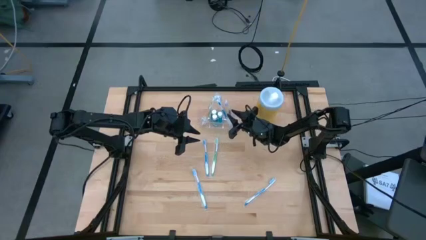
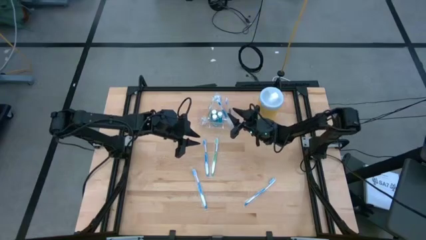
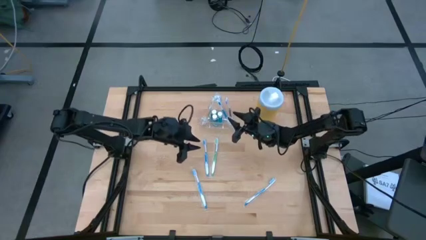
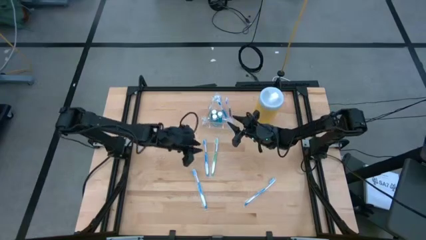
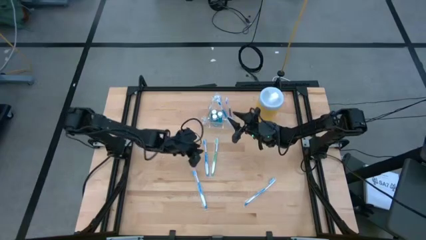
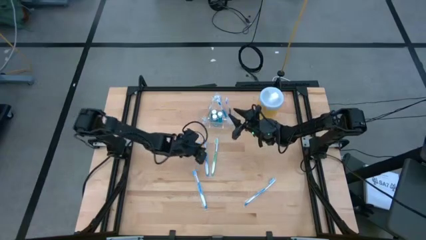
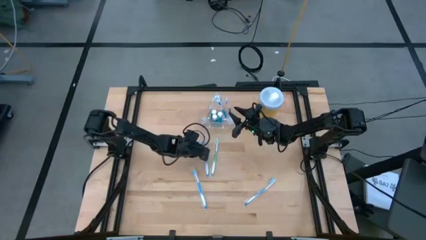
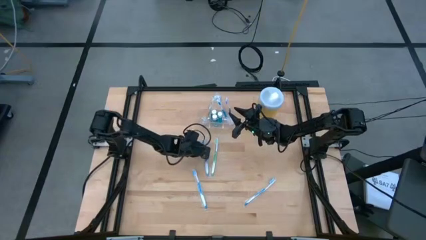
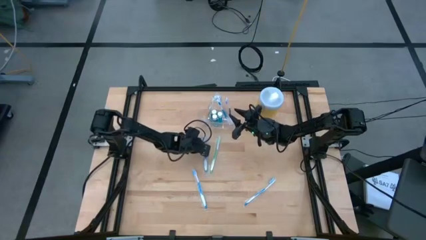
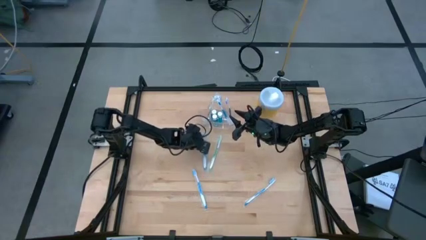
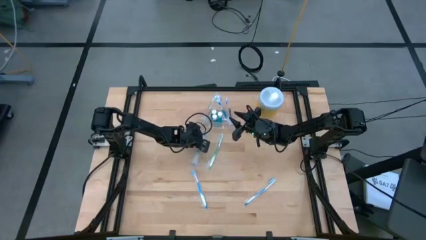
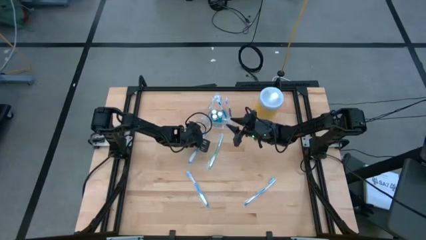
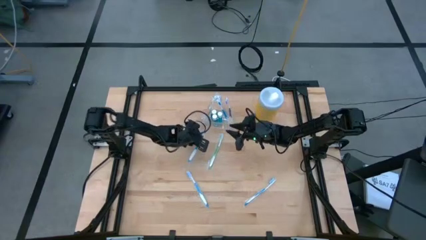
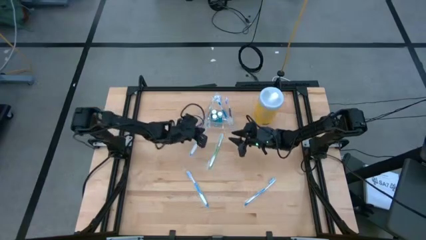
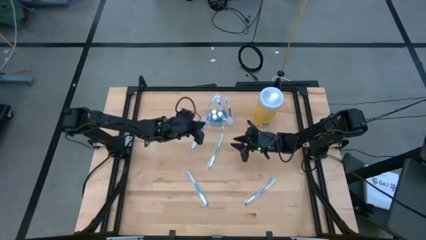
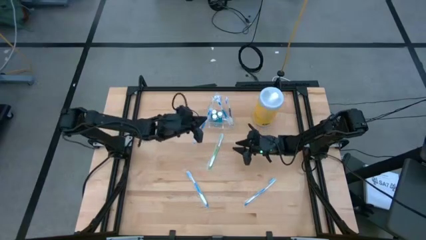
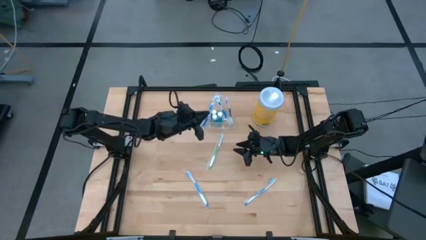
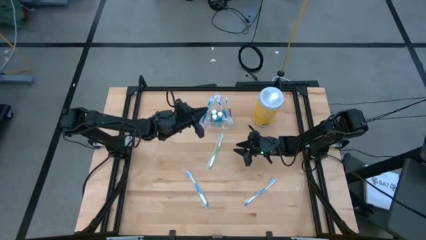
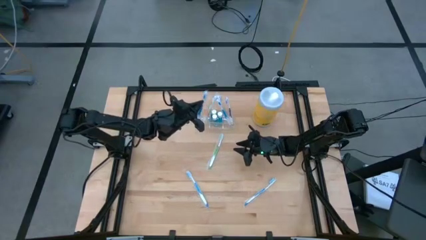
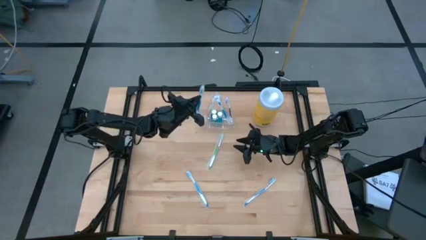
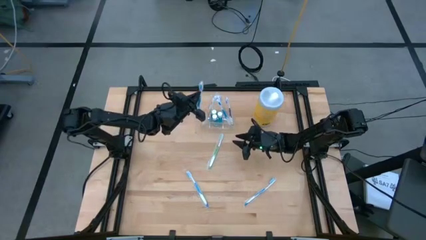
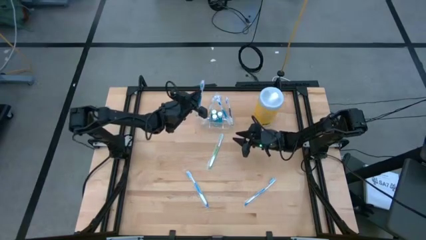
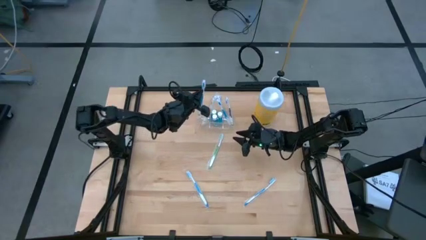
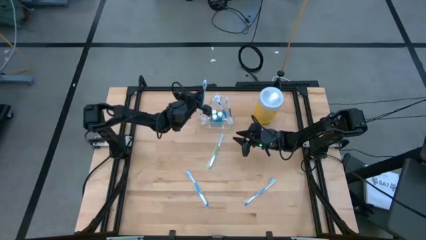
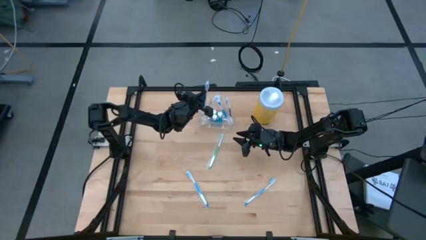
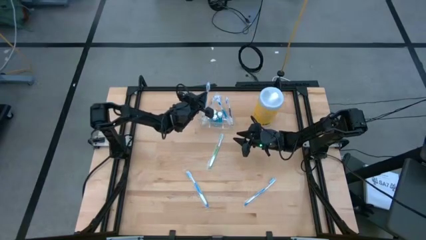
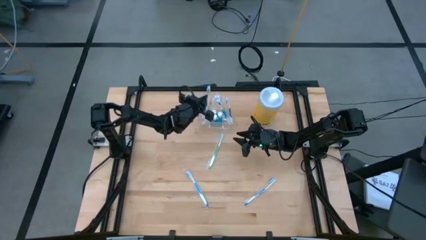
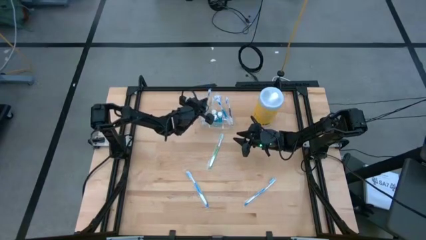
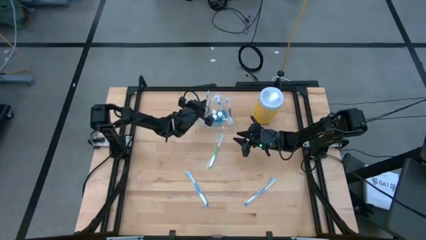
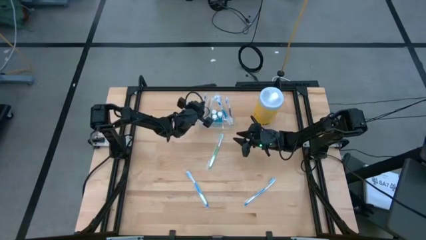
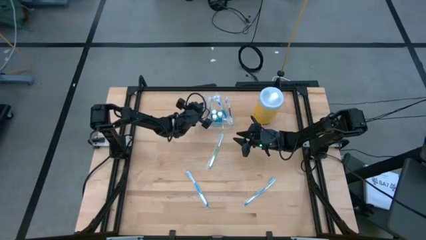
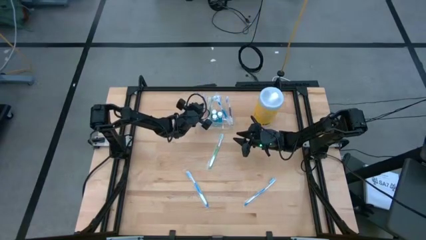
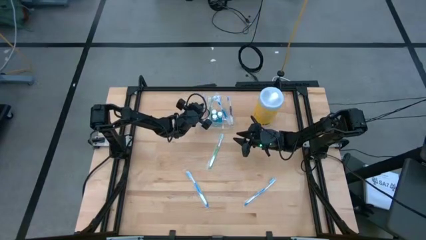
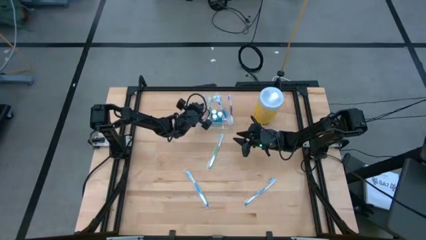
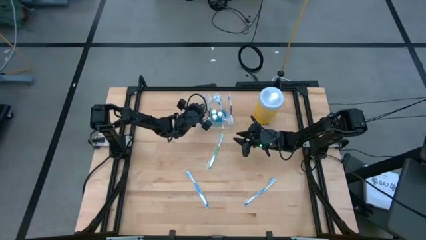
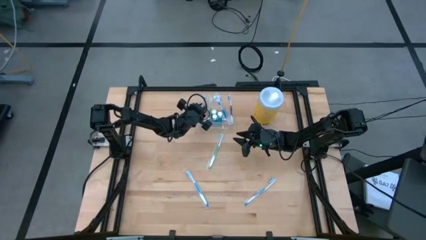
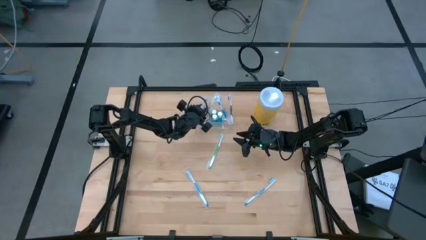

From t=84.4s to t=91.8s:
Task: Pick & Place toothbrushing station
Put the blue toothbrush into the left compartment of the transparent organizer

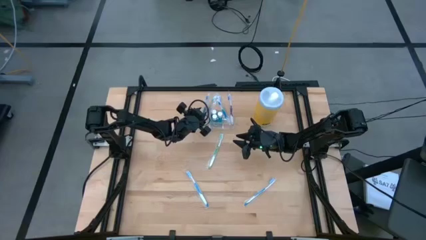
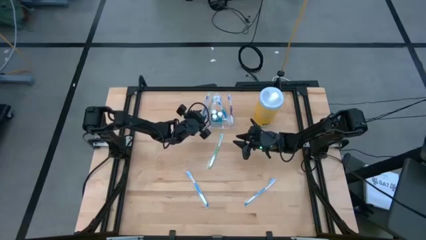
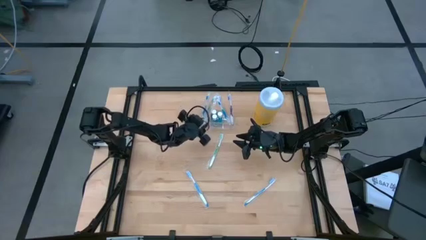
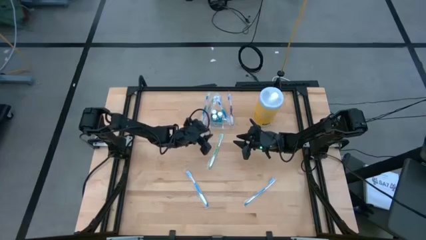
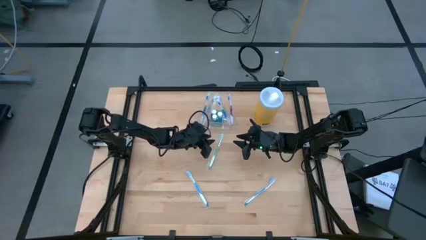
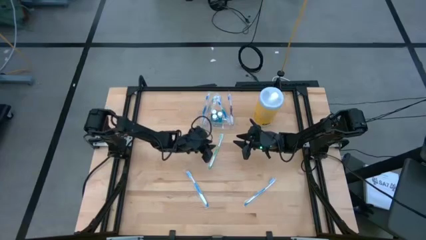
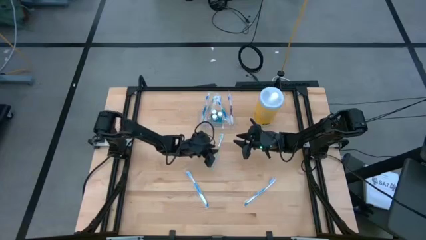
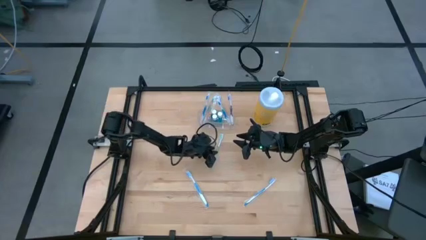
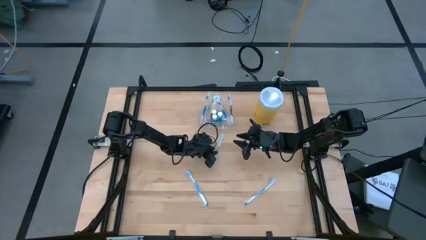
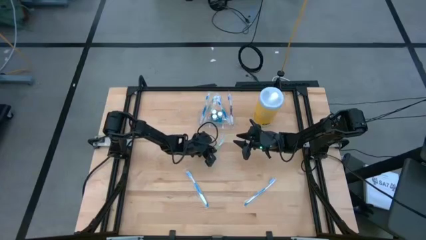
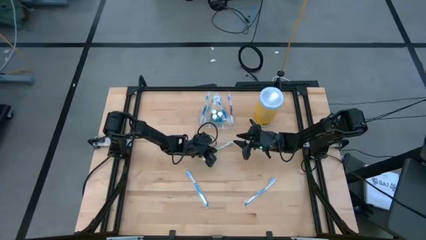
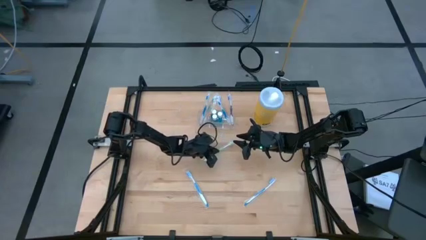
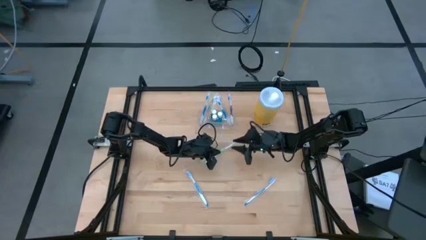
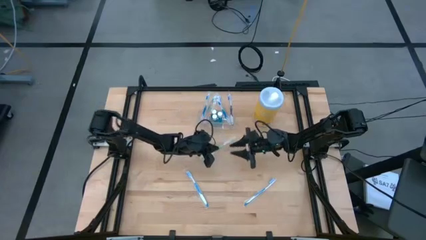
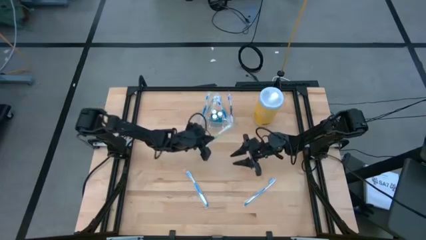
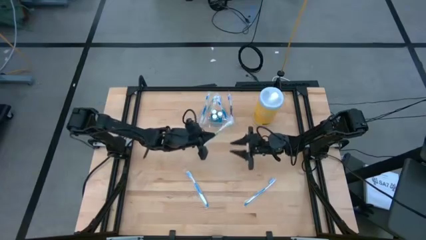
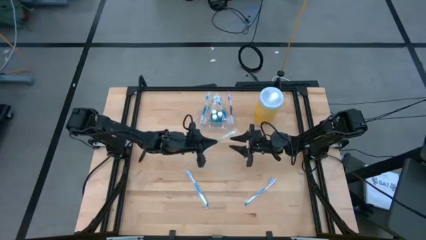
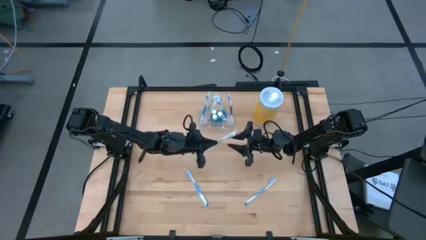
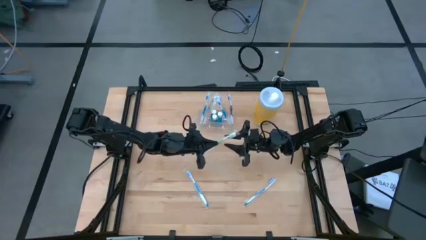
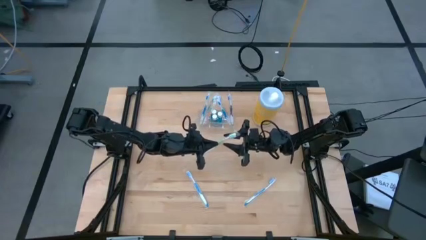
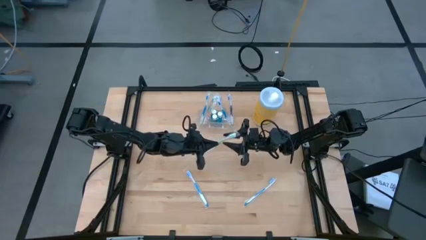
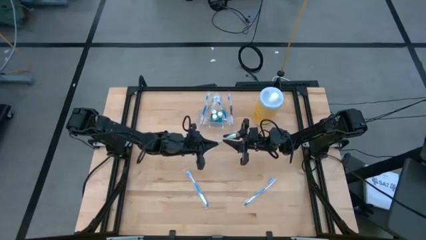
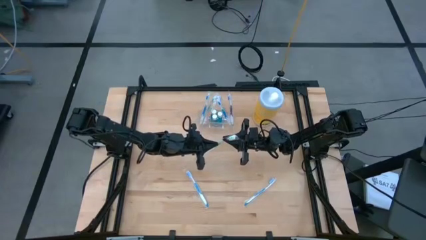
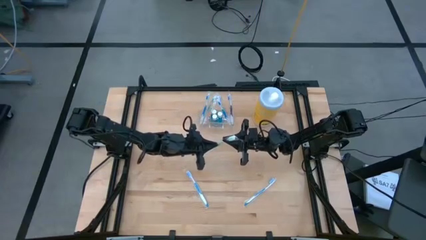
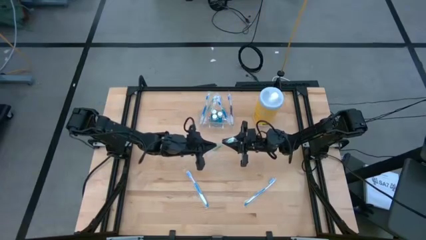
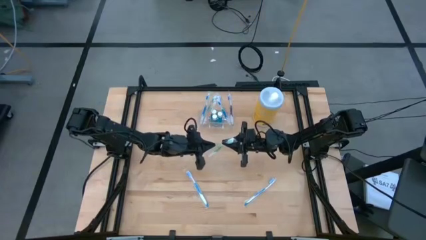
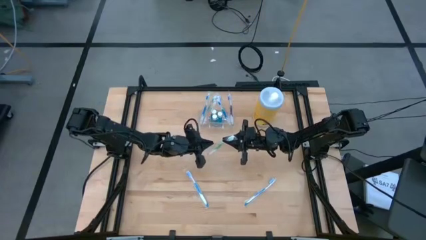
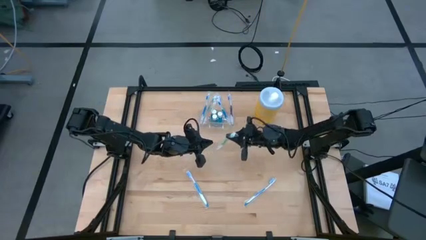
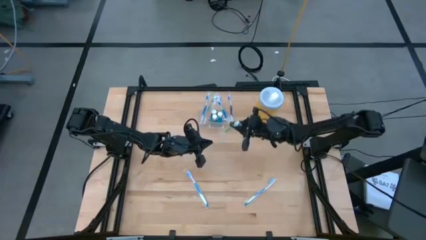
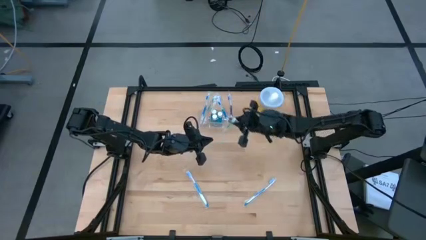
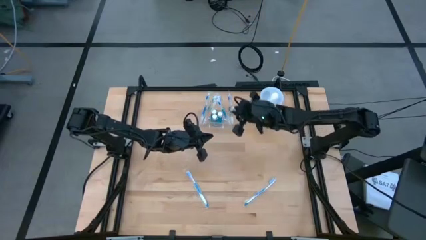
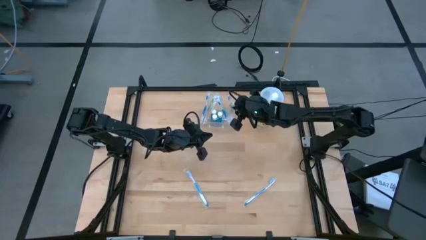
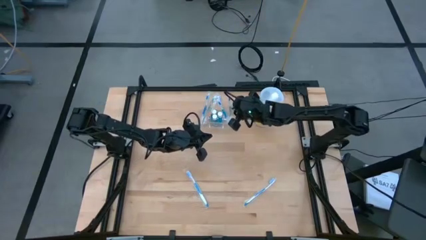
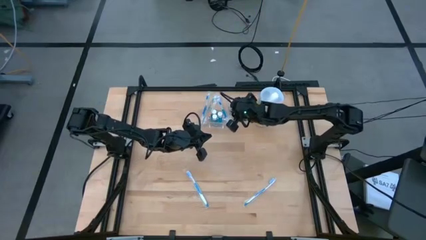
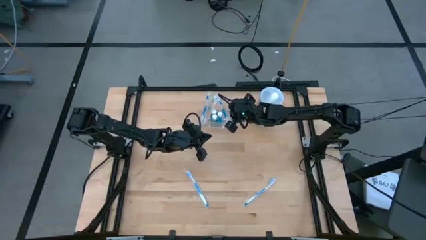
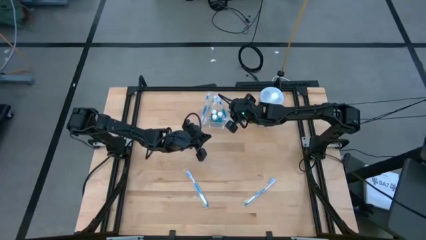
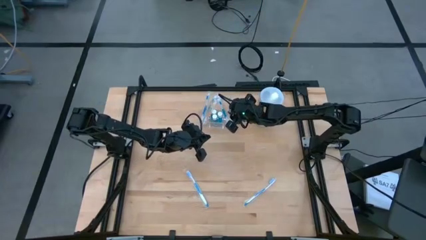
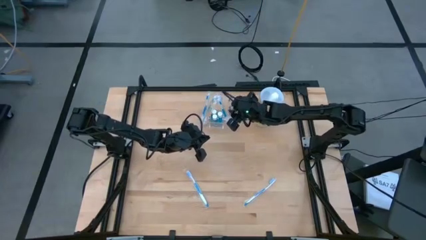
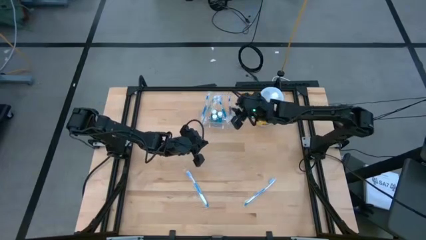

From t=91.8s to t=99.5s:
Put the green toothbrush into the right compartment of the transparent organizer

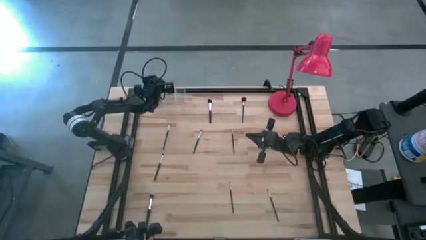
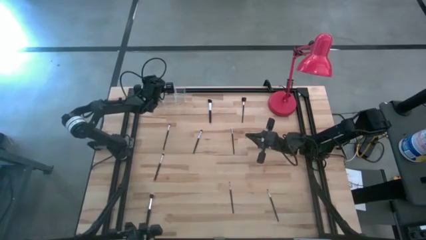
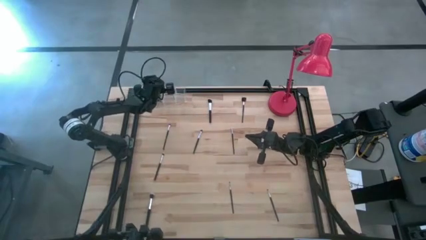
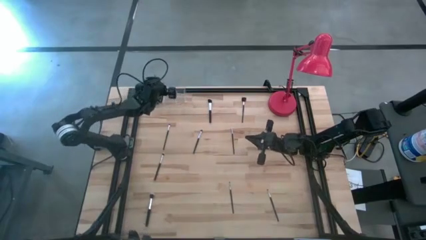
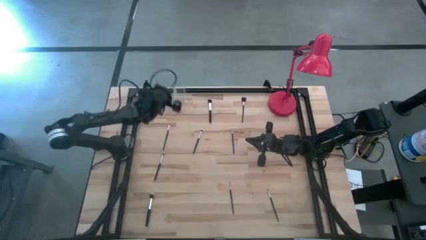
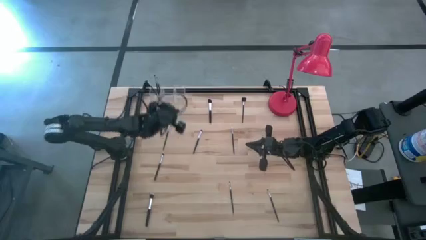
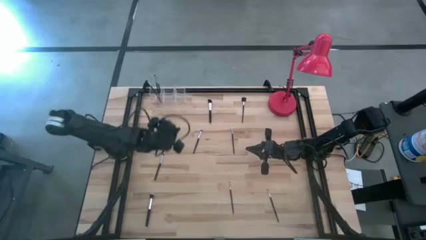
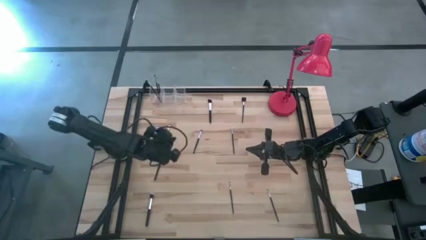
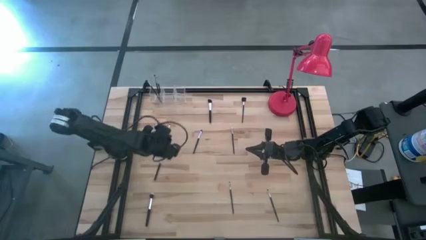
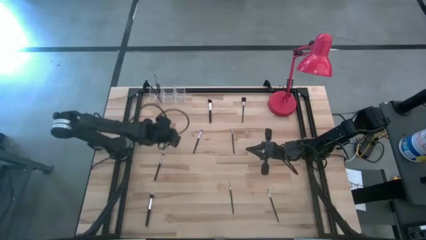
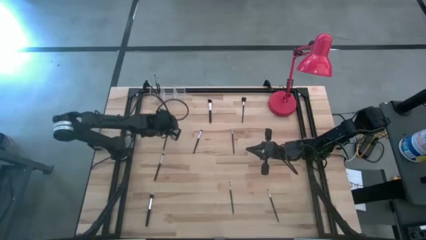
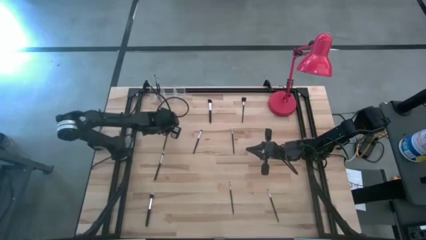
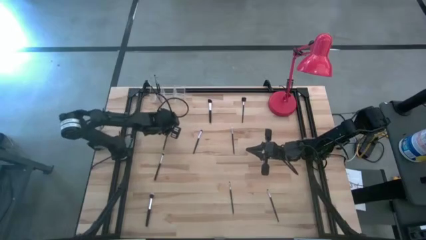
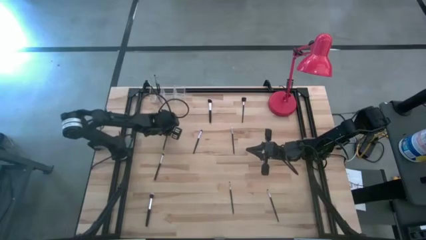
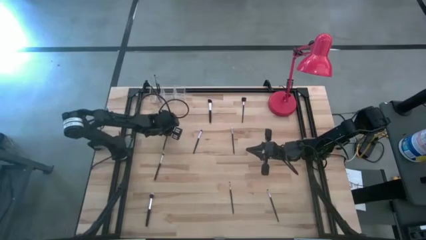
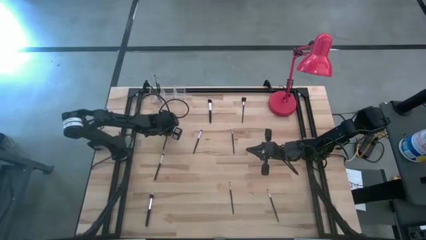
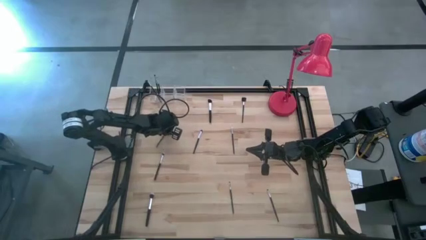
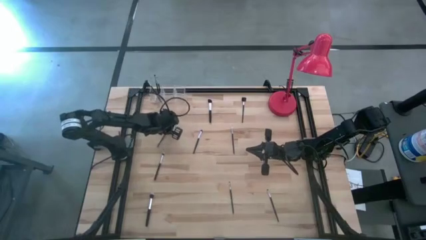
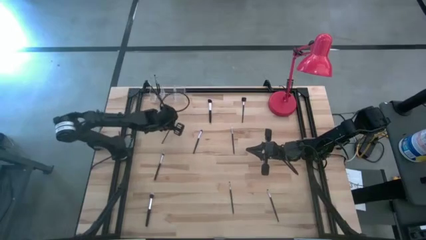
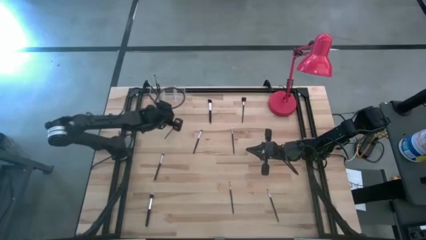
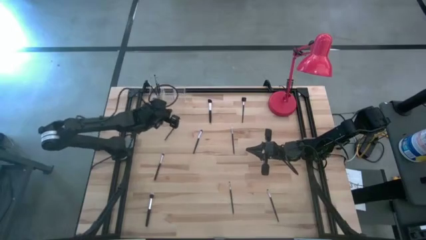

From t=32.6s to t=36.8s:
Task: Pick & Place Makeup Brushes
Put the lip brush into the transparent organizer
